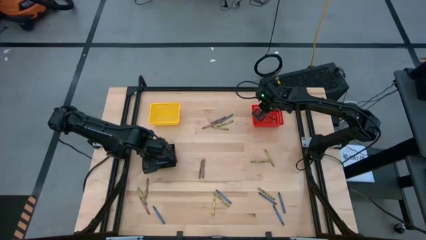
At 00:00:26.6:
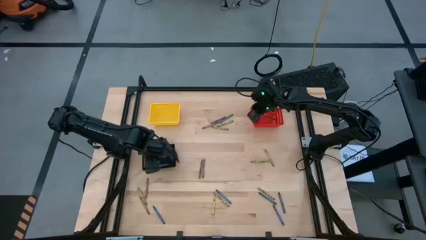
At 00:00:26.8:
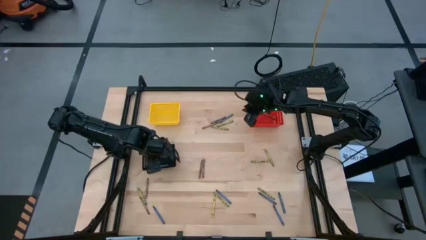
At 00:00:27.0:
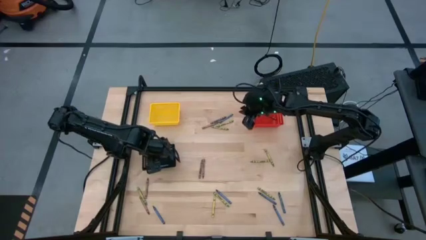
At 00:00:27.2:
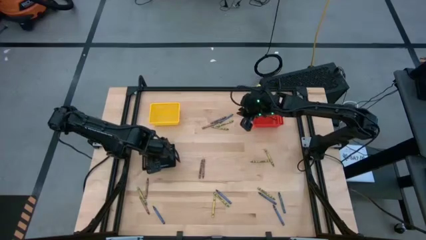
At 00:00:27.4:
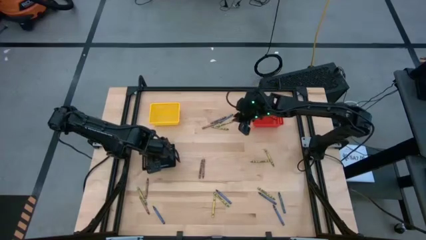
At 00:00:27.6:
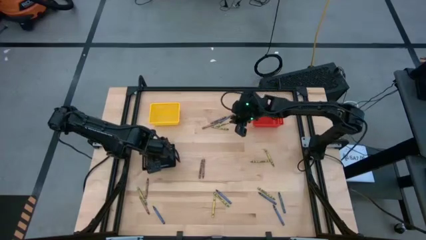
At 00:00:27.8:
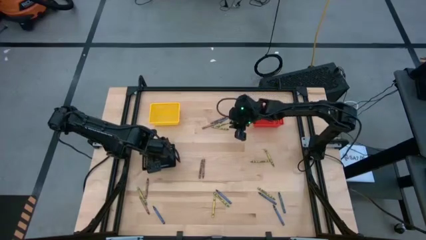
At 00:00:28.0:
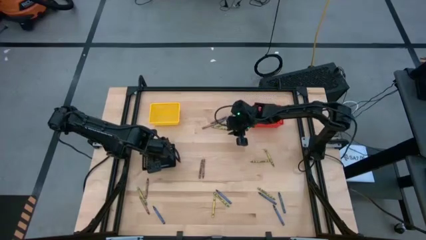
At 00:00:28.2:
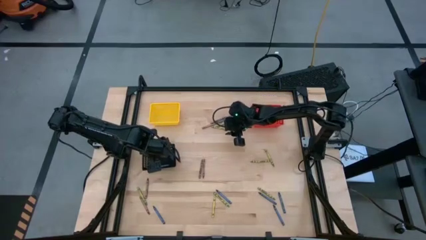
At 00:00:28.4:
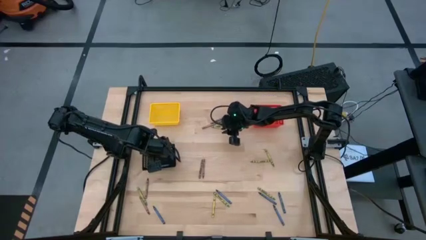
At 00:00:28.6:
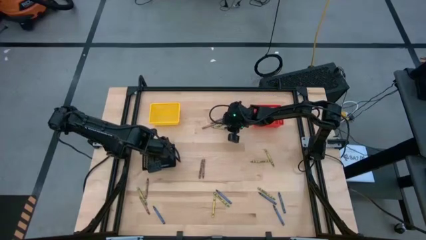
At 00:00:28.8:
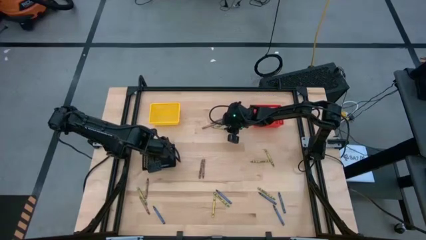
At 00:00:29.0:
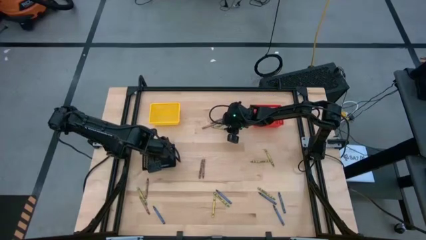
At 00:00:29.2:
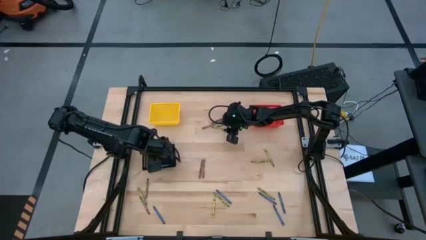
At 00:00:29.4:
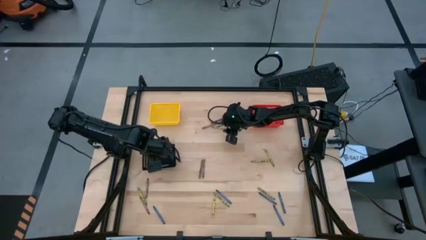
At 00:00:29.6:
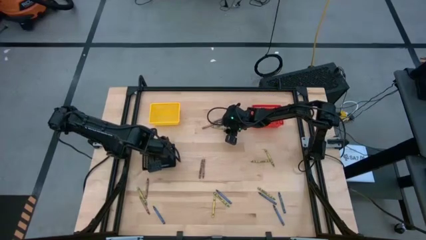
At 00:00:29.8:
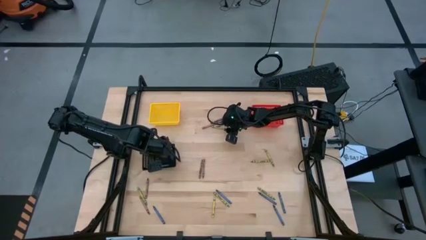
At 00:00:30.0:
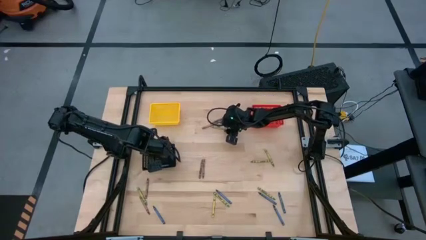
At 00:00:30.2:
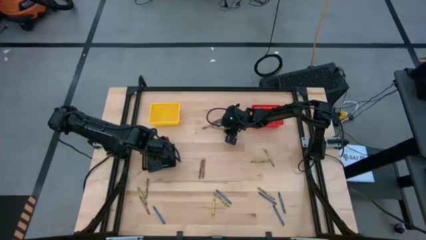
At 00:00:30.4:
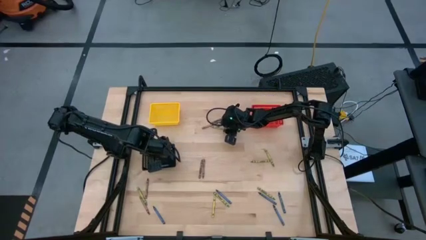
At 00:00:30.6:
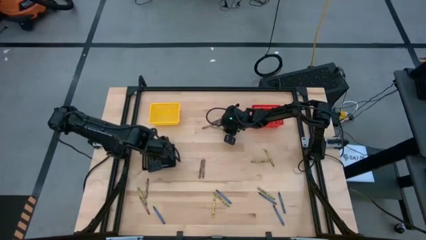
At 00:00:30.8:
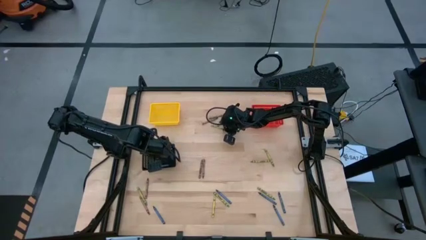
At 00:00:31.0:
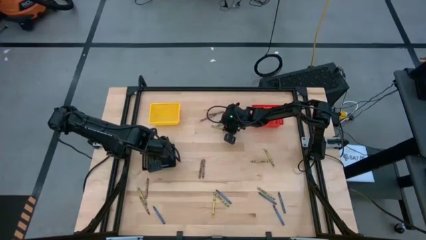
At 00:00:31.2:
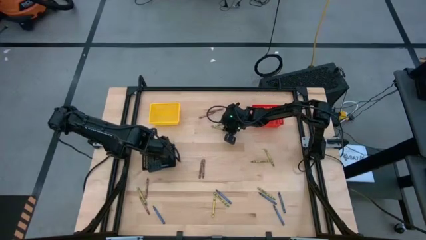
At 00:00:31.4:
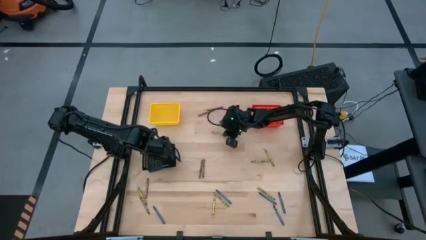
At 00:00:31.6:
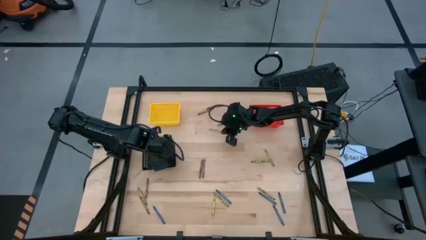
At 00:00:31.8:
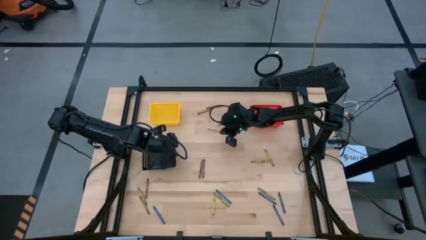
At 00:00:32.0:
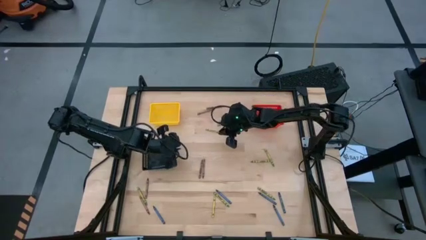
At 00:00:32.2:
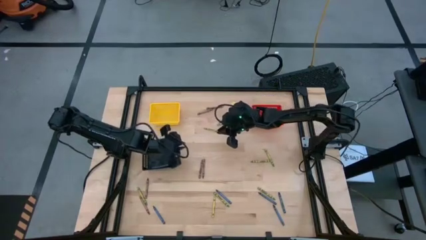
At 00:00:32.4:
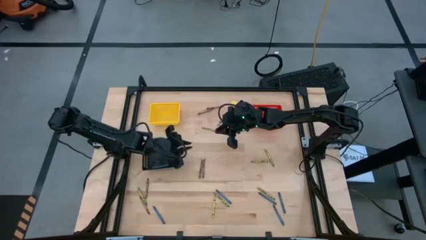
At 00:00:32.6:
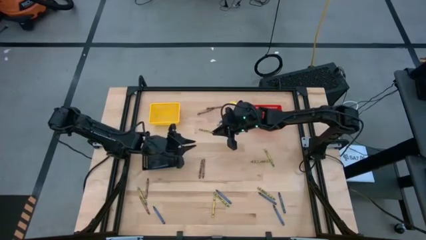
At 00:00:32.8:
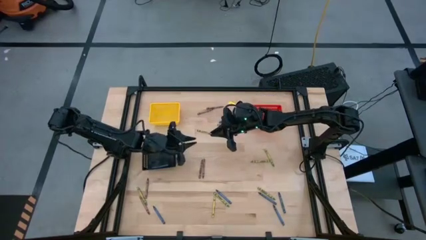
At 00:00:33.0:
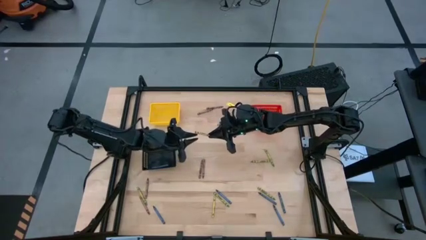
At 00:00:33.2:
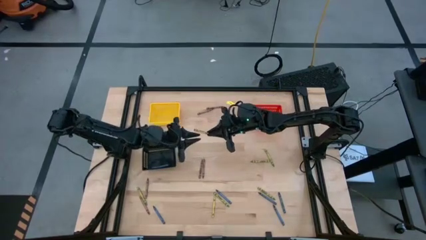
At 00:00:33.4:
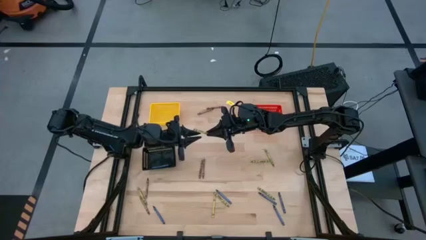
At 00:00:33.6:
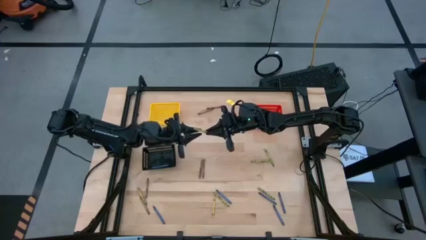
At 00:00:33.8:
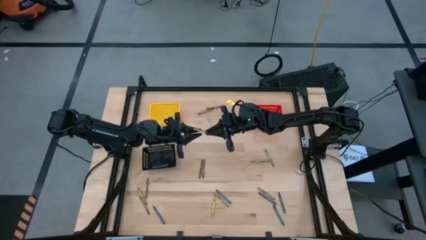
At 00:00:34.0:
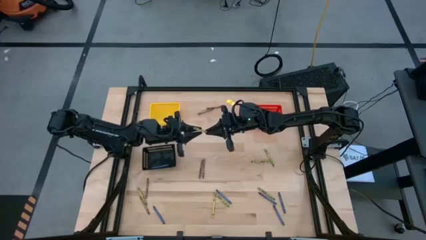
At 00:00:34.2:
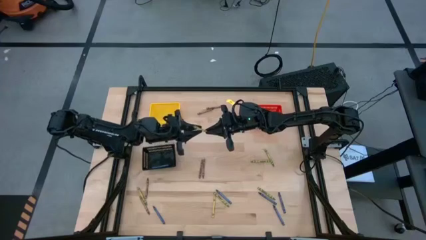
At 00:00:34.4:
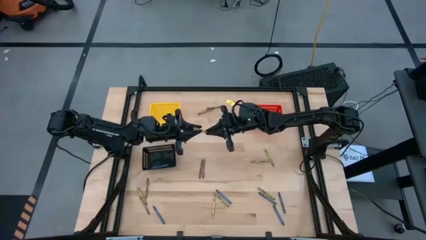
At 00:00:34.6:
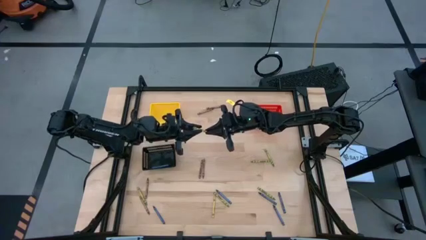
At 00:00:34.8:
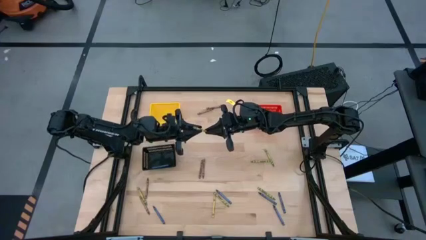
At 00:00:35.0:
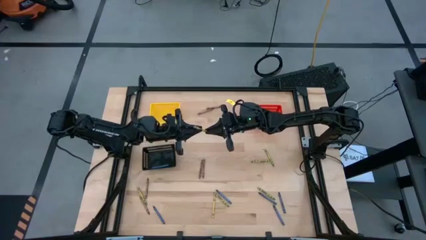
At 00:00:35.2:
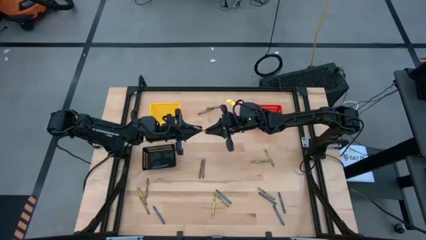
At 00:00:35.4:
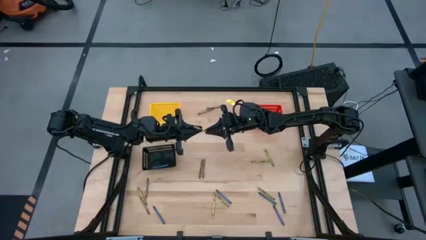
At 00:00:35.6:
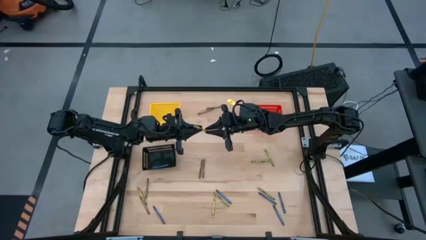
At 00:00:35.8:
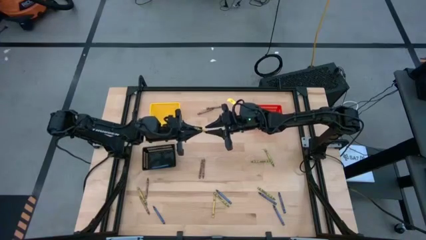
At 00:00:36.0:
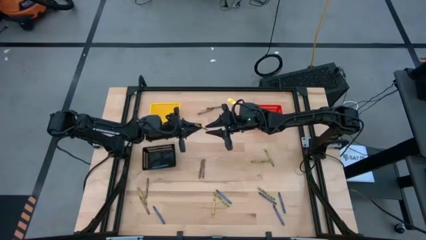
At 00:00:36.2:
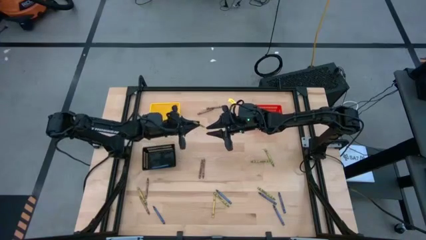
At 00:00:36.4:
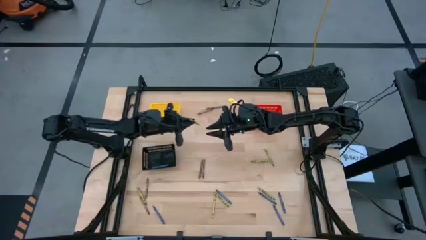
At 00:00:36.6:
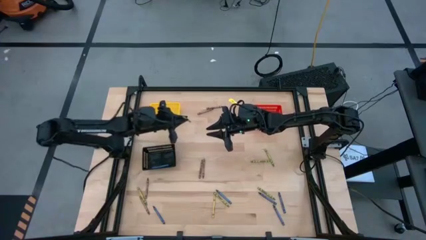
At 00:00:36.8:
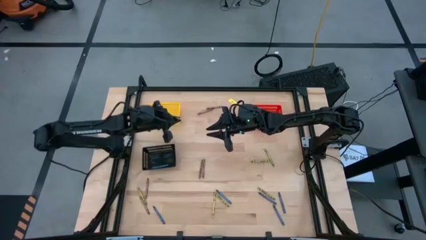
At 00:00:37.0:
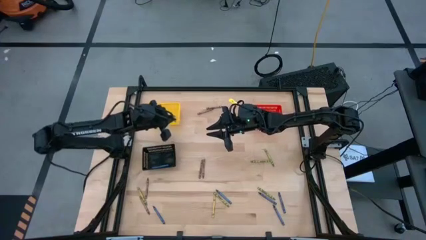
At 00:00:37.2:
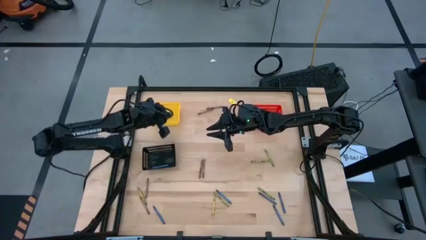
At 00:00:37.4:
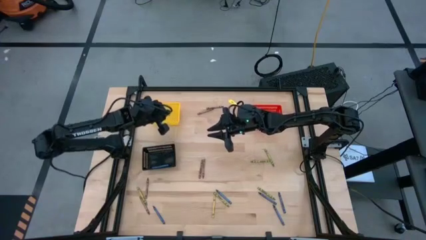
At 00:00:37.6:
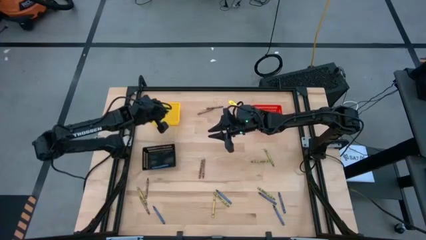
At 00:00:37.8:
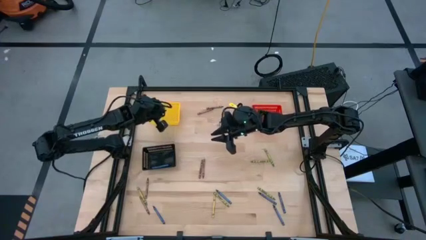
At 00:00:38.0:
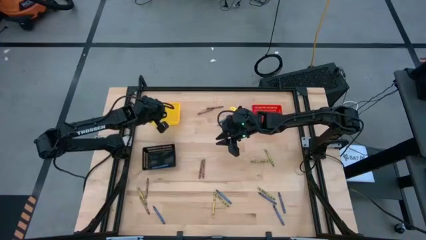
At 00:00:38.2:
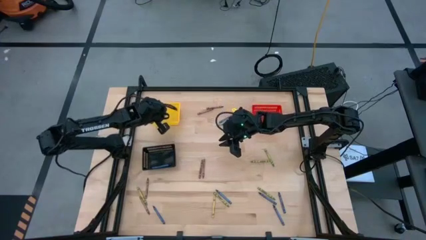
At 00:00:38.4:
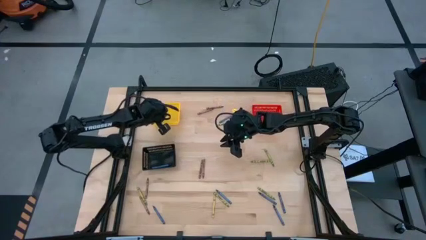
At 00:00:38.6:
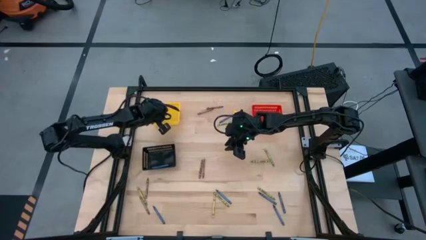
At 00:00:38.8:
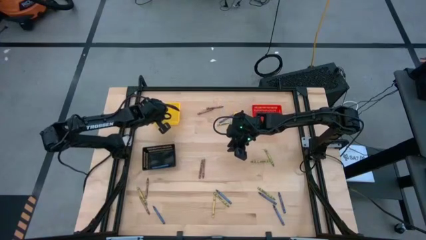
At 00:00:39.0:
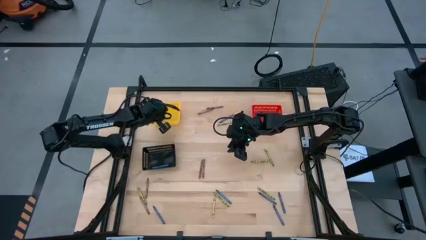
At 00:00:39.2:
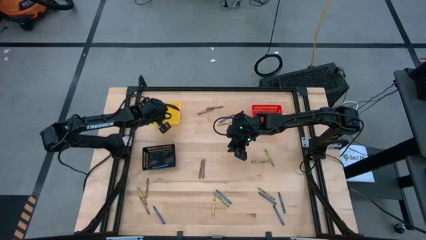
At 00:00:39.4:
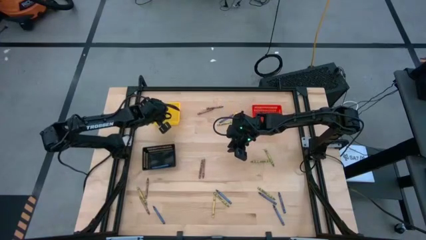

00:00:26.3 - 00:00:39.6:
Task: Sort crayons
Put the green crayon into the yellow bin
